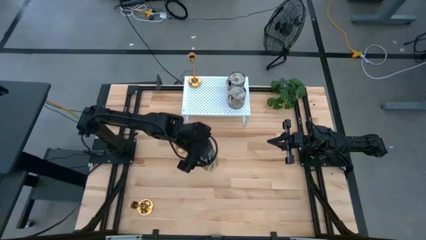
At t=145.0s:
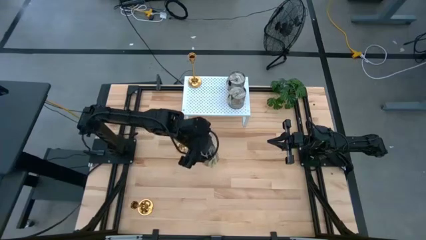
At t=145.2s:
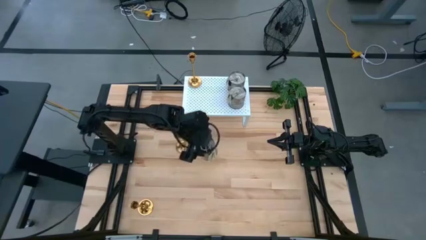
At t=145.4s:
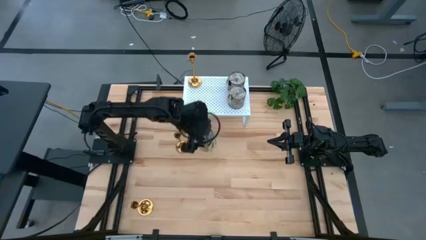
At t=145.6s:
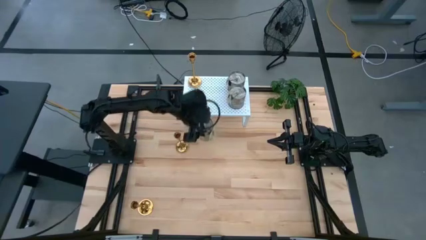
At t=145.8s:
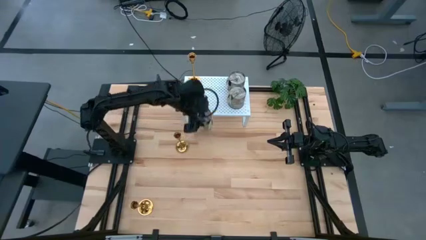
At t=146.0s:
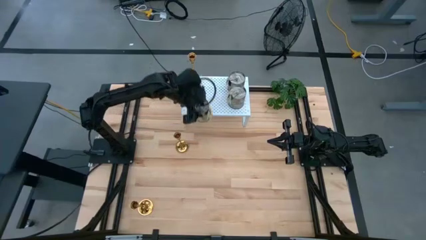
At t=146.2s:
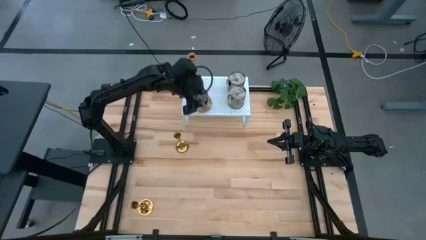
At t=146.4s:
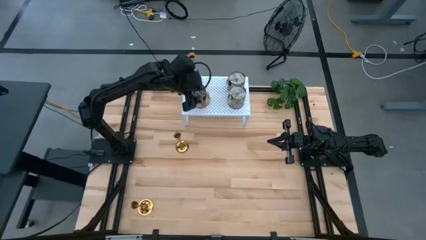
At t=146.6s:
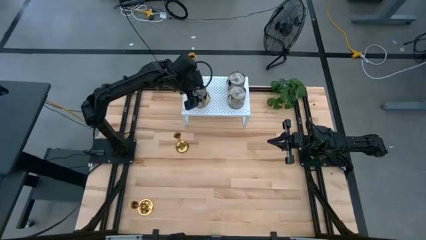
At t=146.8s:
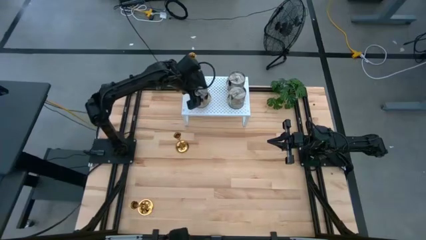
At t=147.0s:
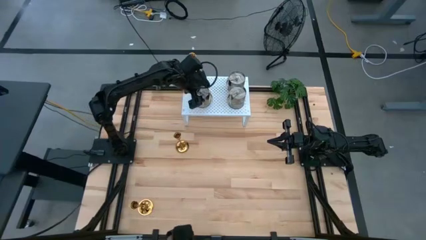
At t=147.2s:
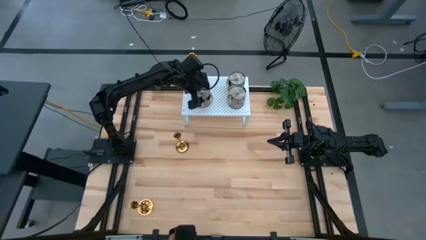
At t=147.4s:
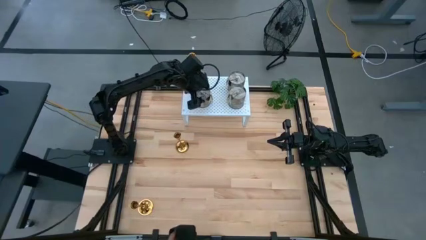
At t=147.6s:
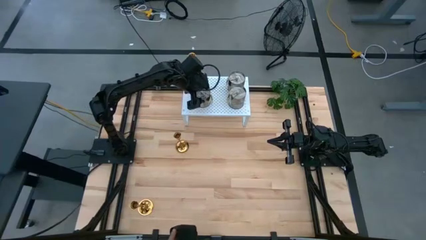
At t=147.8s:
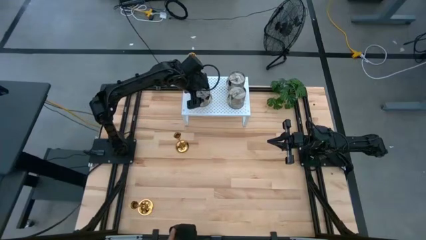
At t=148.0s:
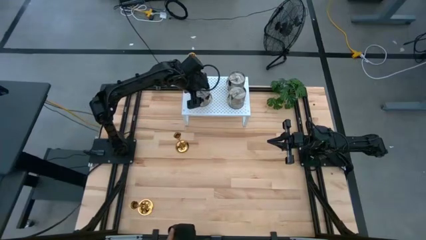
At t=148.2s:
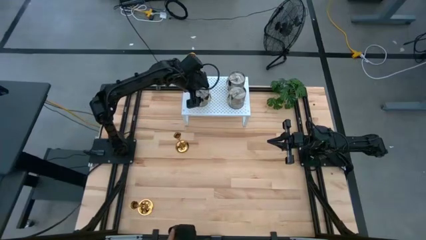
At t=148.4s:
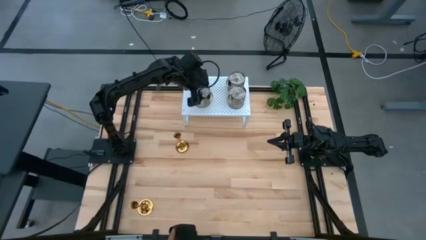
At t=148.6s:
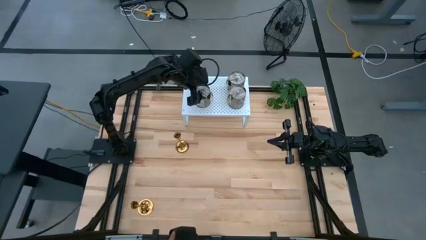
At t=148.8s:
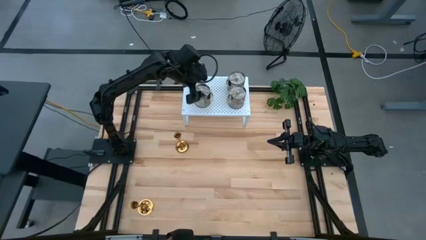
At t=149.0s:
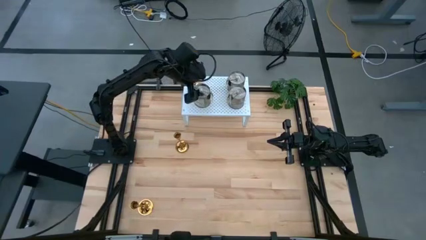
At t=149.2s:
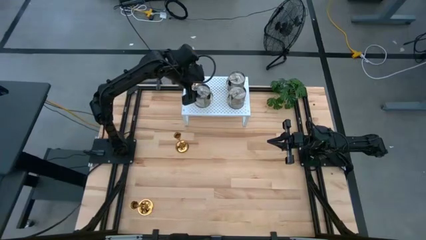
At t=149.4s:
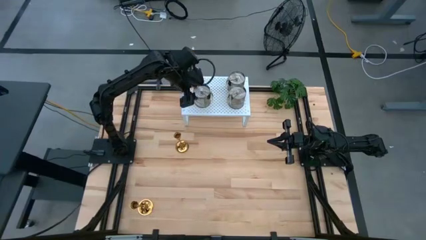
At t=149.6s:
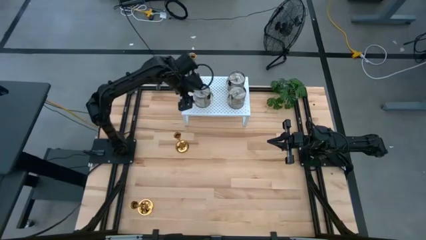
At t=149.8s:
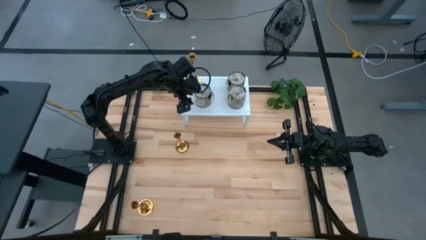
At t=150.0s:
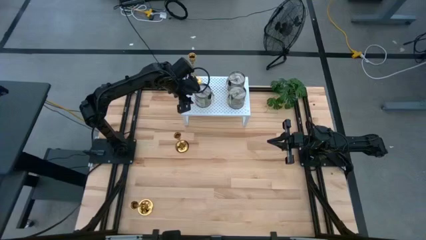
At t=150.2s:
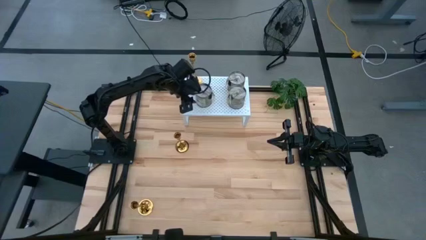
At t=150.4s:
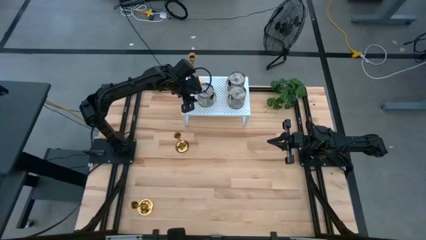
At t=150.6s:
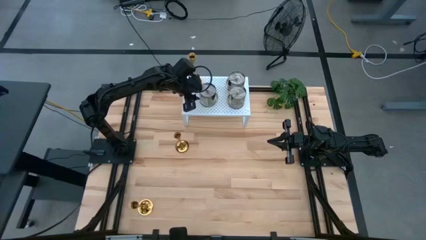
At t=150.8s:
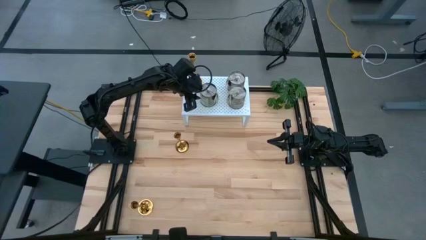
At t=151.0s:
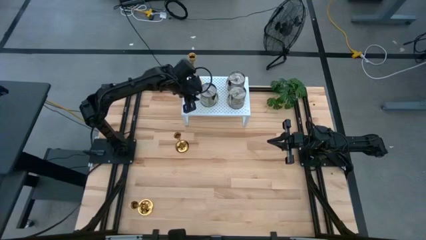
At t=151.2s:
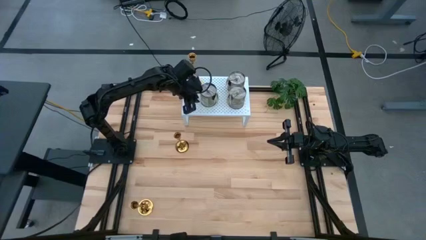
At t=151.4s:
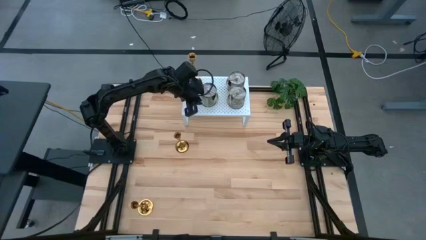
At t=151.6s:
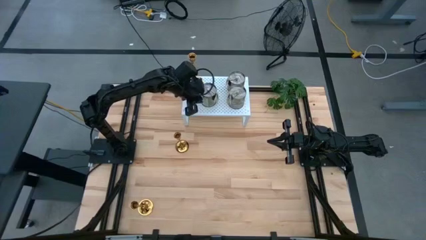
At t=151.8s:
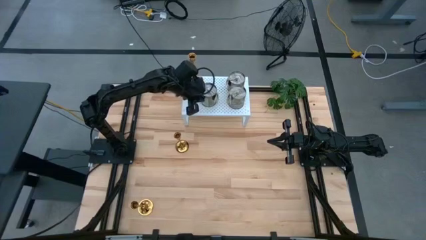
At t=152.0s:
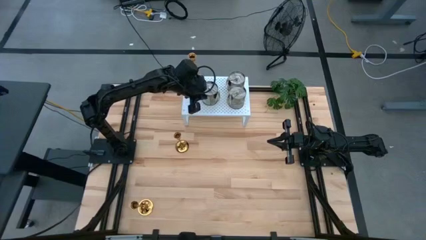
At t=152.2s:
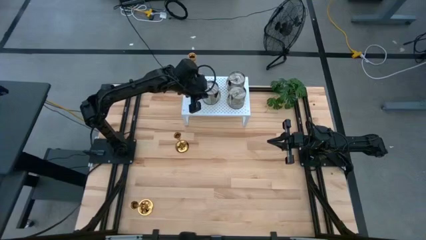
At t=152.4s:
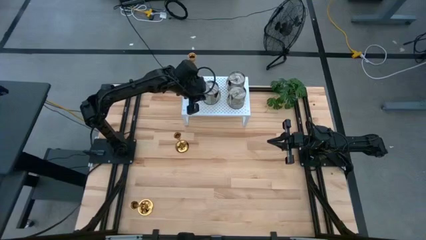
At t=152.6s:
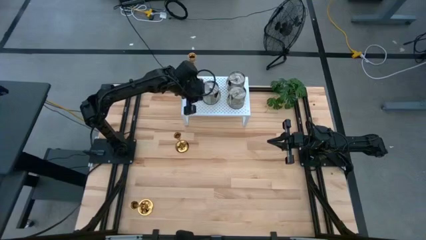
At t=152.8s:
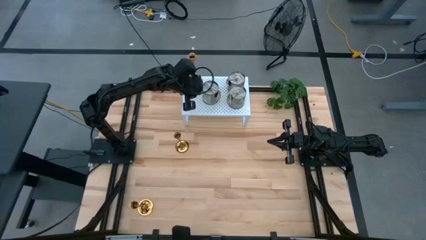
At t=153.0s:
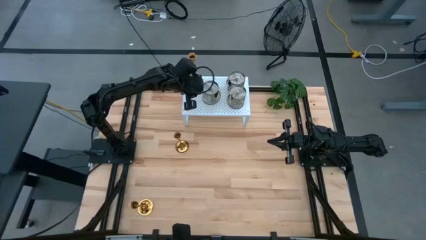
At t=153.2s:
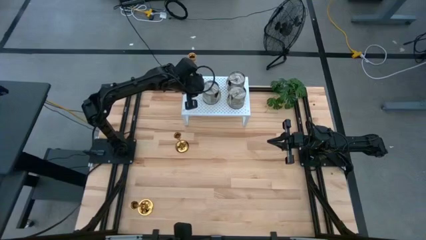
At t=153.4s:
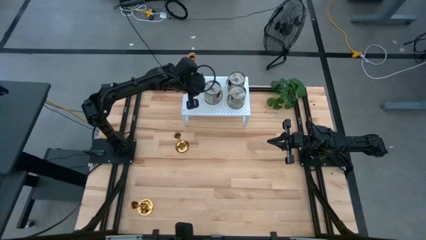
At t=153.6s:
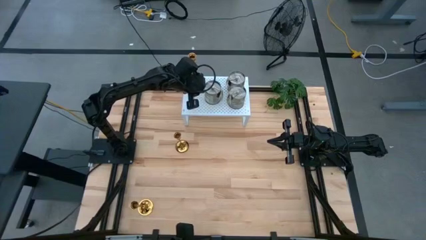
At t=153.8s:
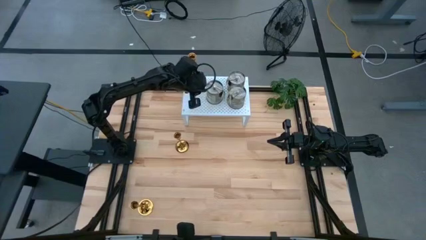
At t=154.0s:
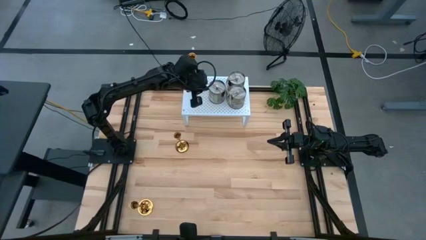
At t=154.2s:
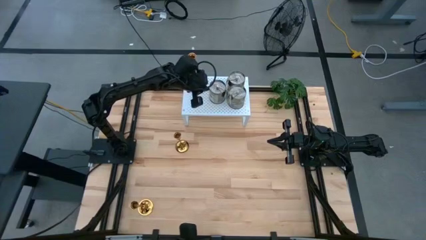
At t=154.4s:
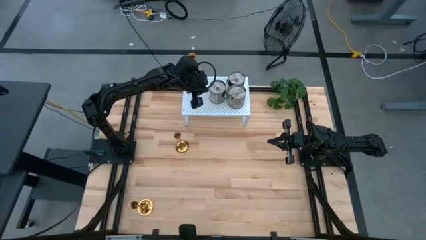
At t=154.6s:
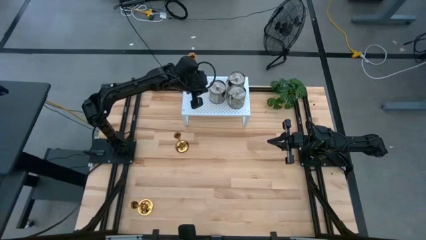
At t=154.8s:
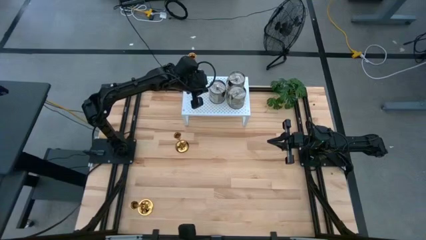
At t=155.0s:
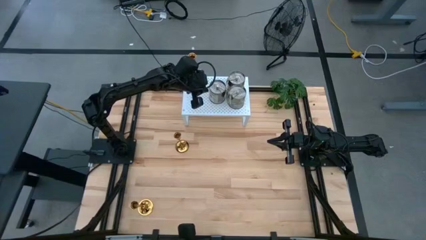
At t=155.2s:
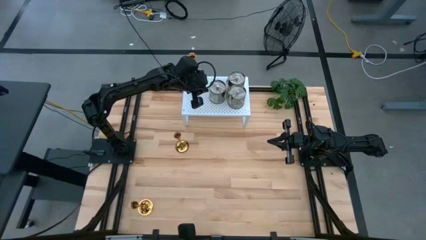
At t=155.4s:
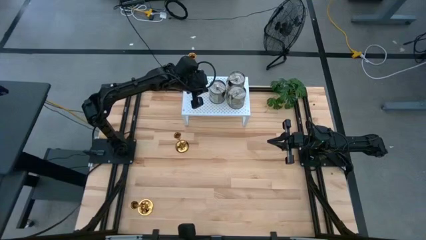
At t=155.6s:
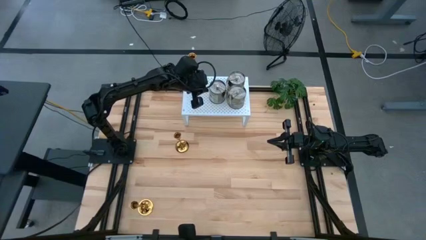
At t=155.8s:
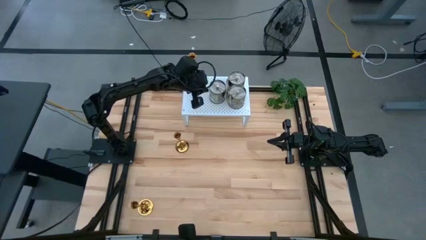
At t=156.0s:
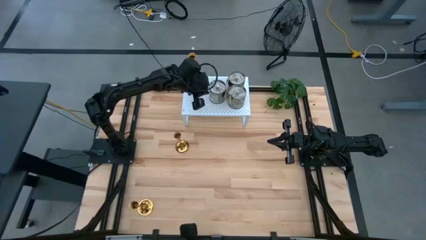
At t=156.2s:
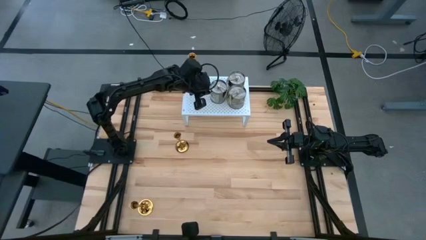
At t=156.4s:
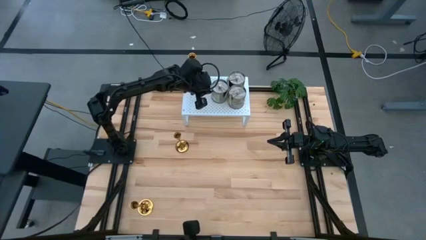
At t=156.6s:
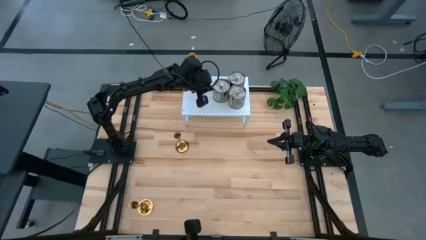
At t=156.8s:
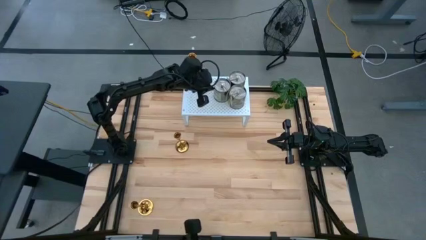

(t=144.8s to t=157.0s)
Task: Pick & Place candle stick holders
Put the scented candle can on the shelf

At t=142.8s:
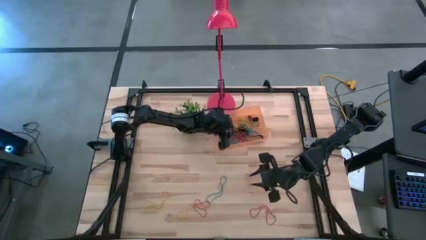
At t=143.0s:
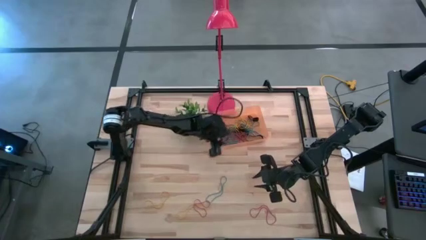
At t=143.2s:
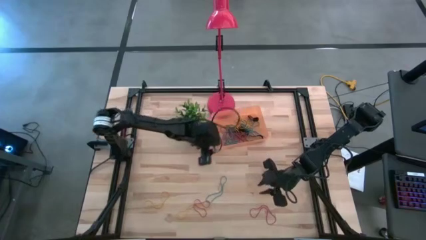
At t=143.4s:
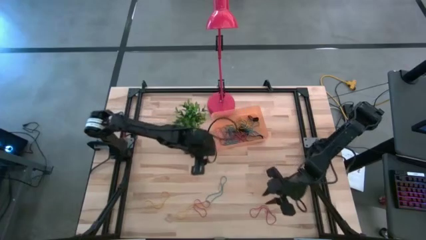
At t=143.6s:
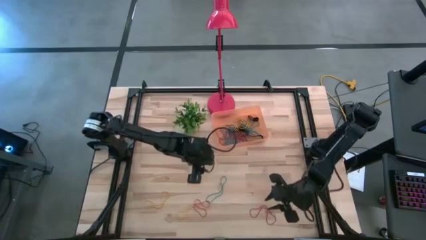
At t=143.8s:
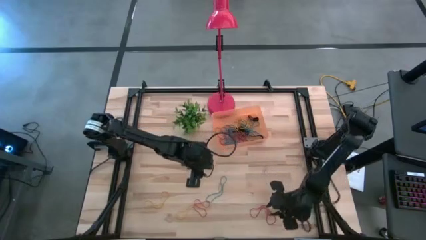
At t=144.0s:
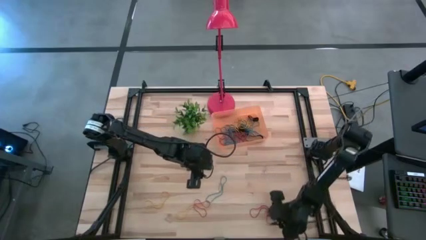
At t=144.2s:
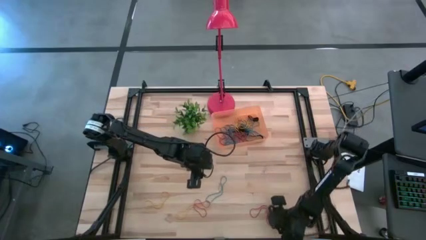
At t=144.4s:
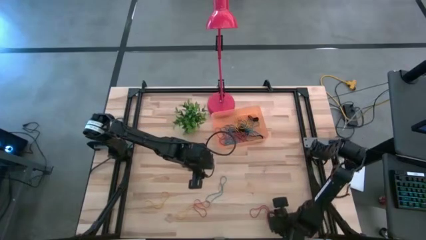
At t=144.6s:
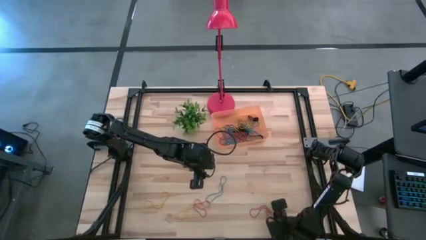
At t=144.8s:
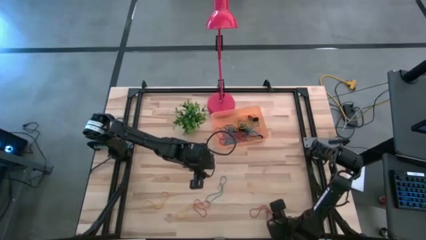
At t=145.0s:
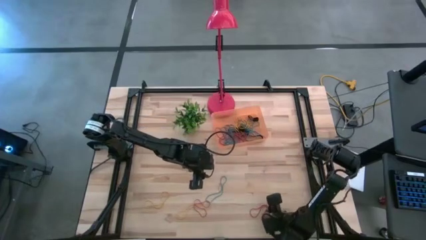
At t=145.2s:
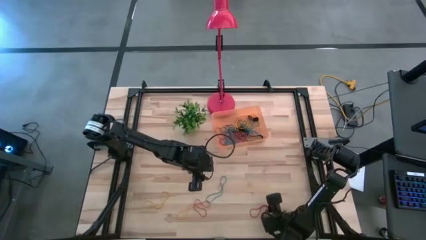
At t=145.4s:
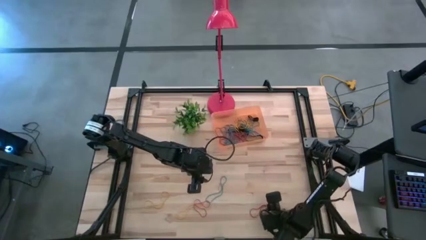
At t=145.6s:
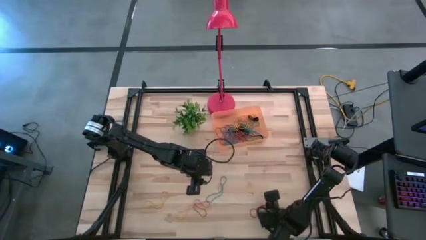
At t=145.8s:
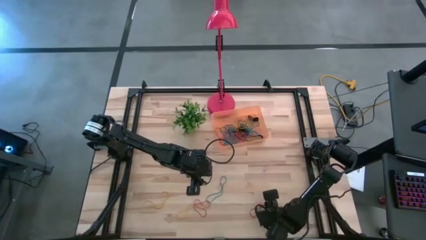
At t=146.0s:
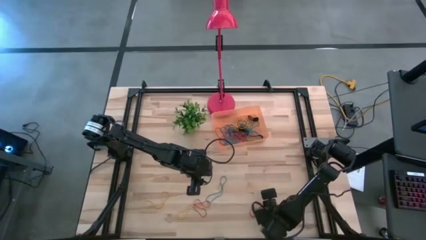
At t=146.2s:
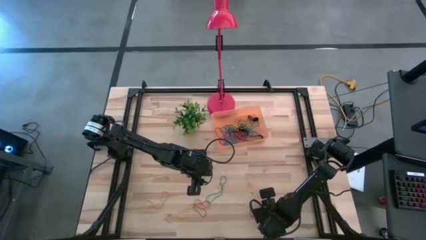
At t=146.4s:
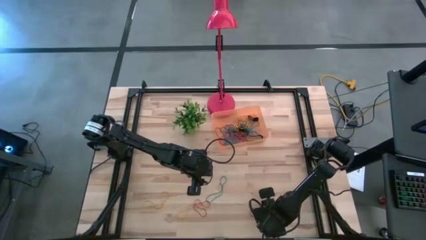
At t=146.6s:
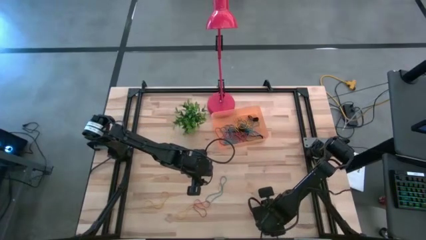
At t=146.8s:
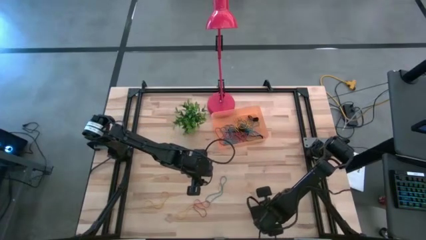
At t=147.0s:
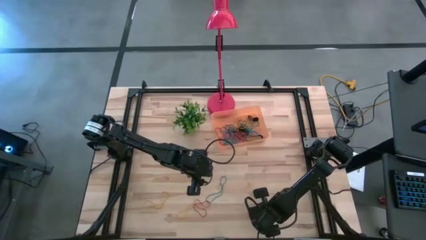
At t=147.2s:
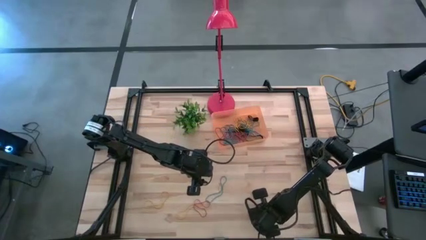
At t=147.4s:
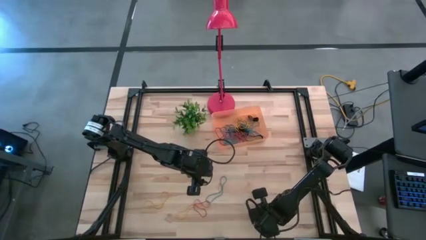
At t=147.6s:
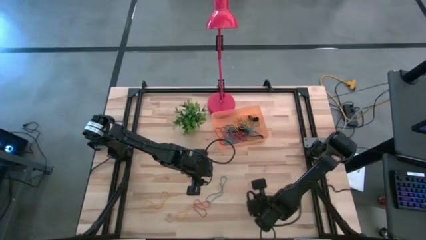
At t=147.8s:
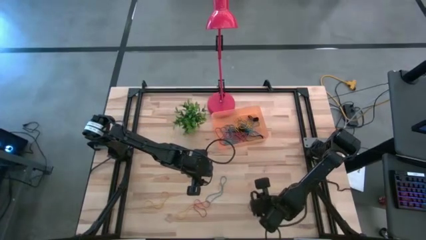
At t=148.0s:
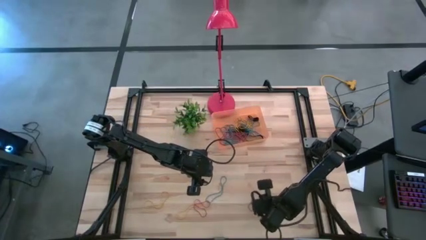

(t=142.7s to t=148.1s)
Task: Pick and place rubber bands into bin
Put the red rubberband into the orange container
